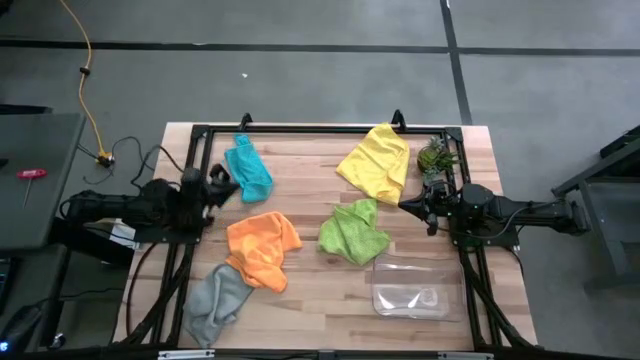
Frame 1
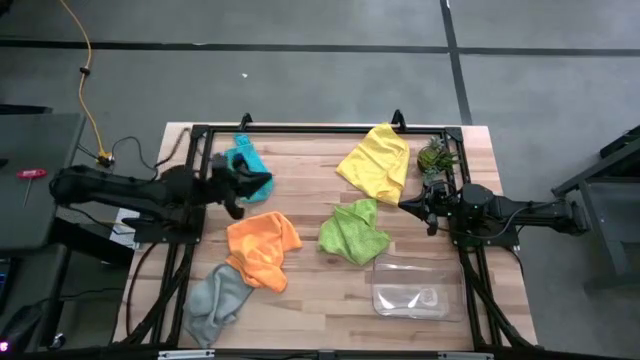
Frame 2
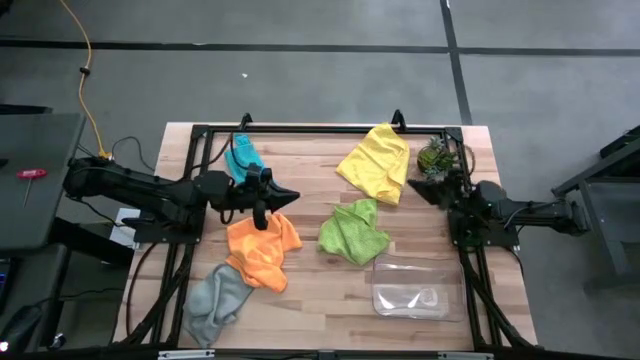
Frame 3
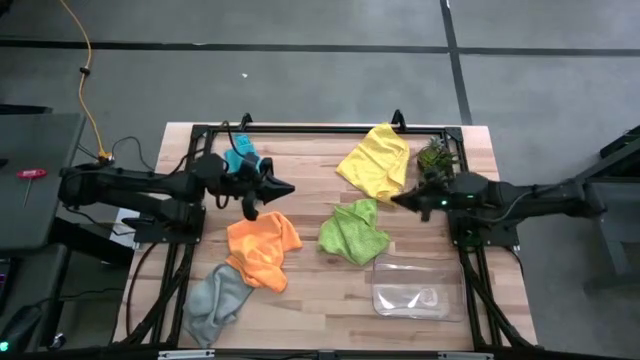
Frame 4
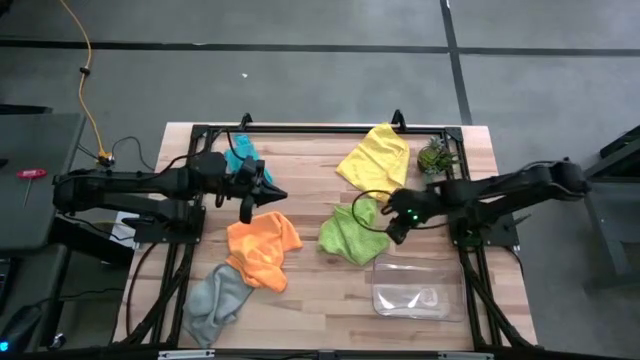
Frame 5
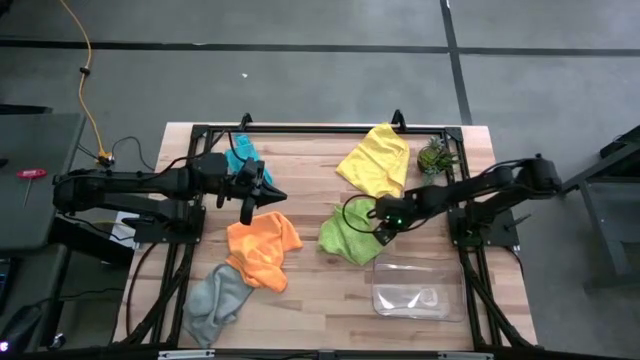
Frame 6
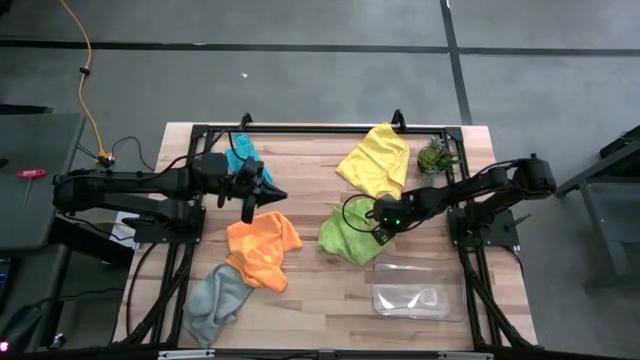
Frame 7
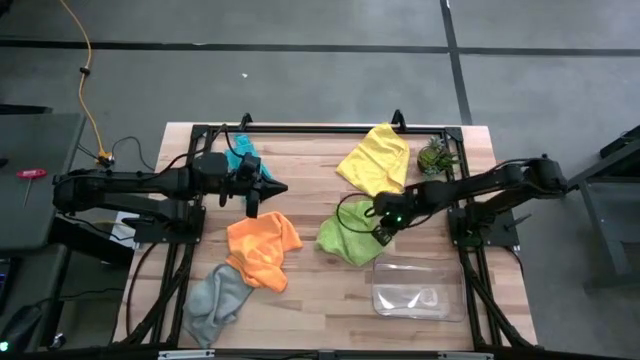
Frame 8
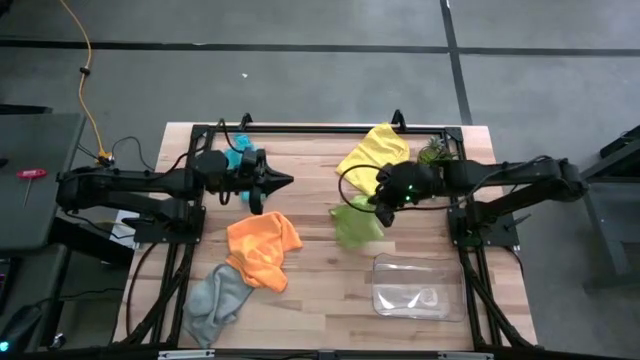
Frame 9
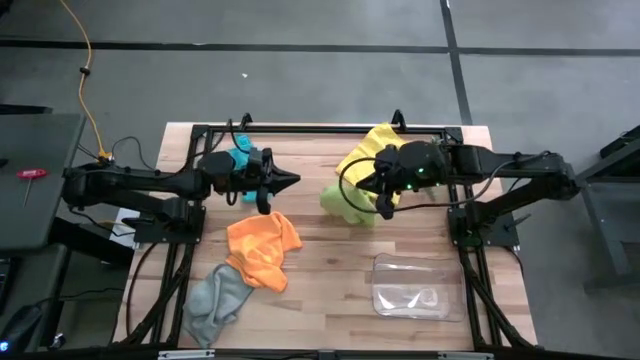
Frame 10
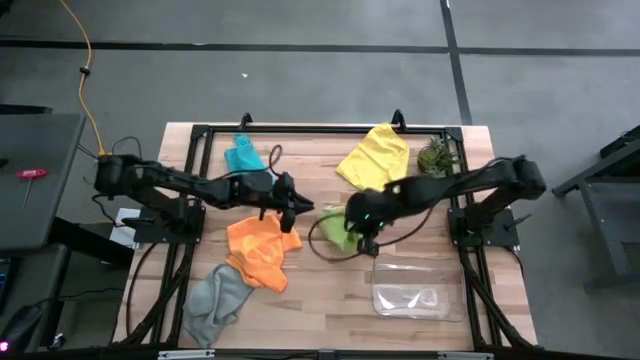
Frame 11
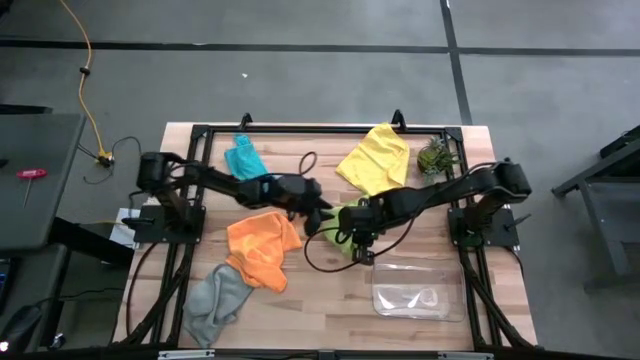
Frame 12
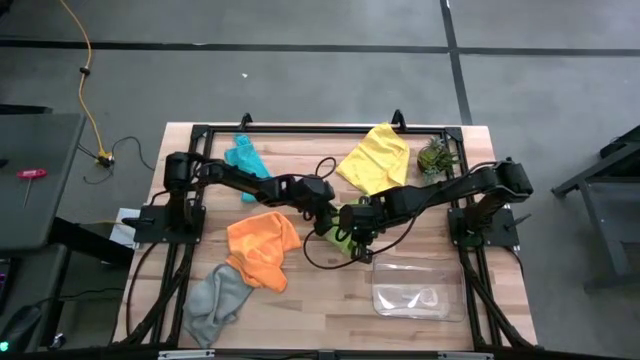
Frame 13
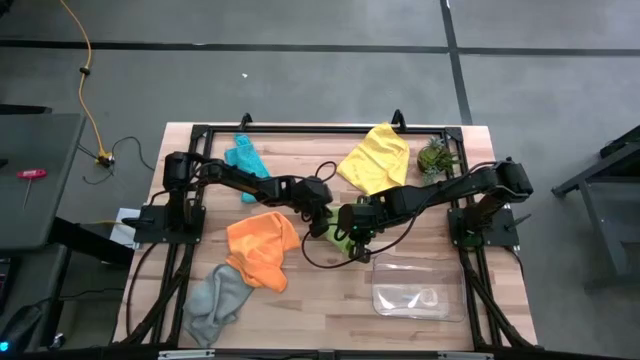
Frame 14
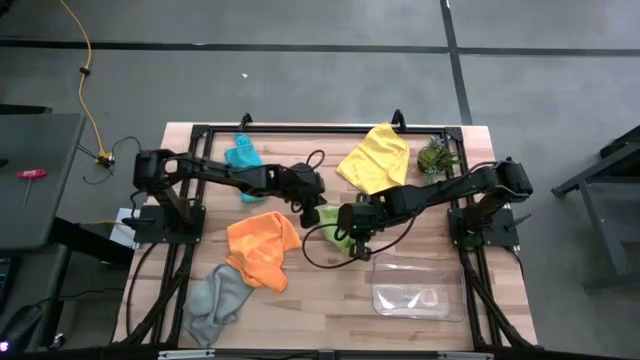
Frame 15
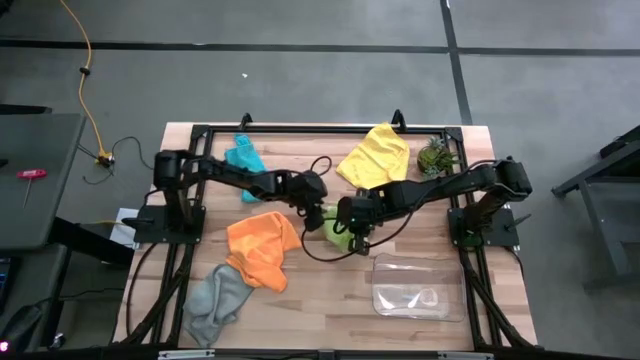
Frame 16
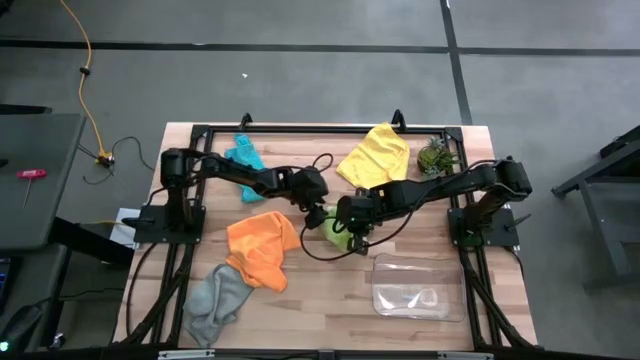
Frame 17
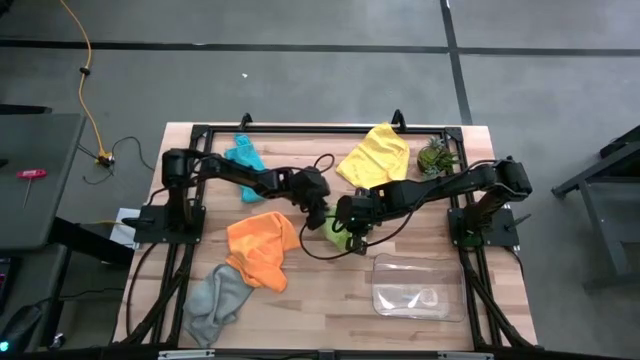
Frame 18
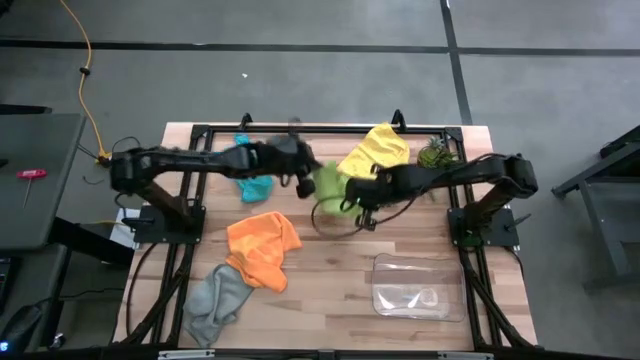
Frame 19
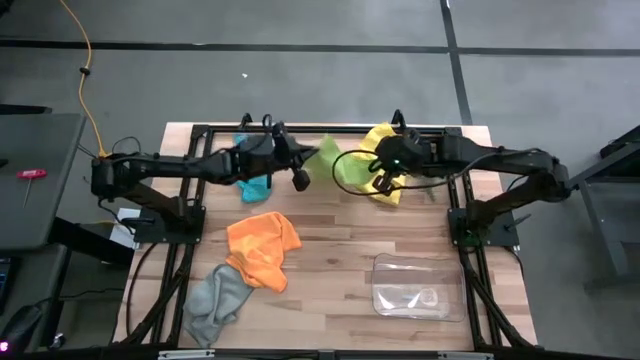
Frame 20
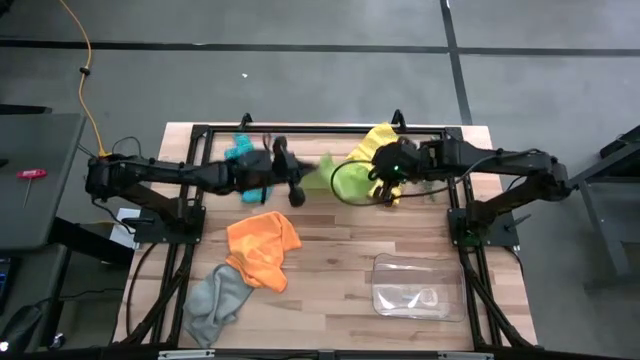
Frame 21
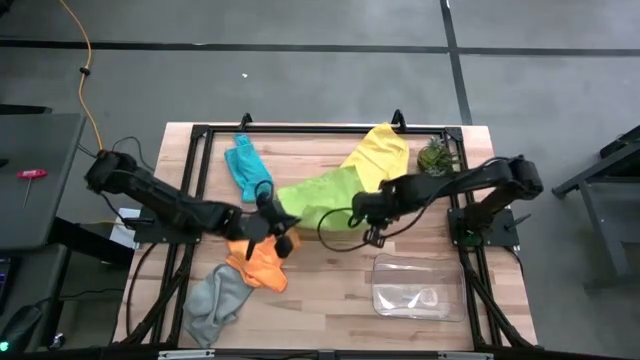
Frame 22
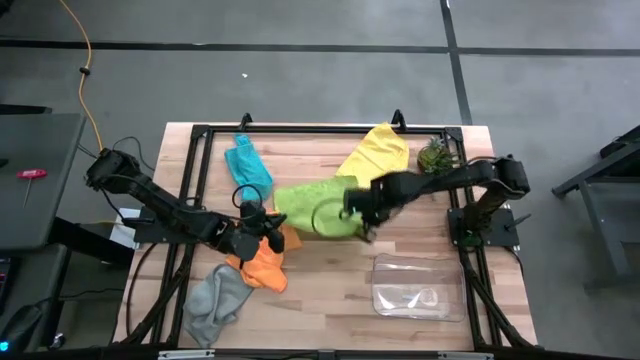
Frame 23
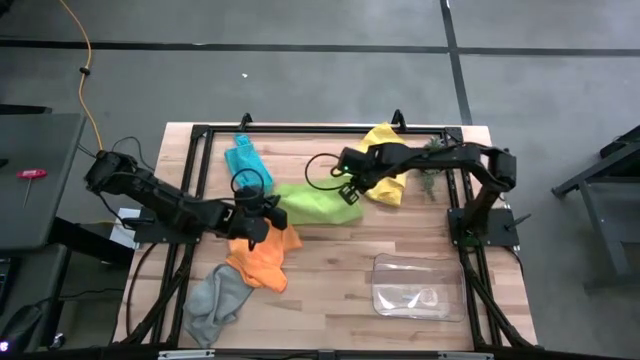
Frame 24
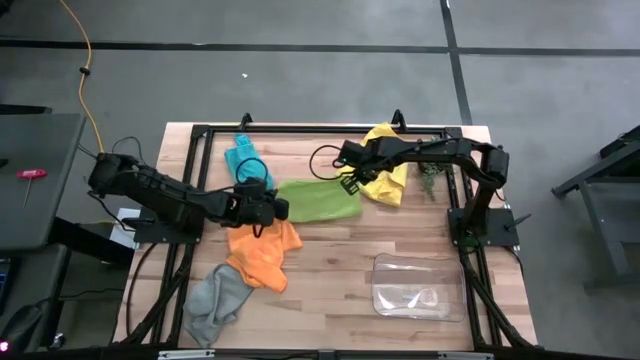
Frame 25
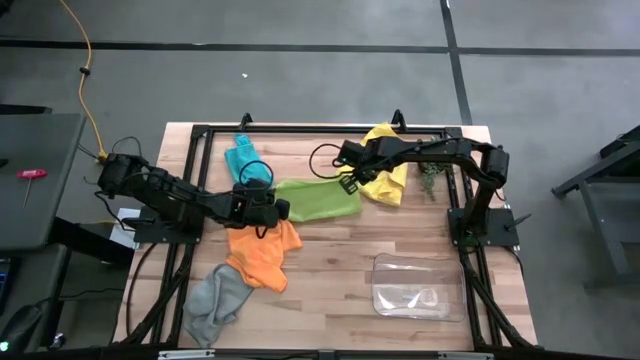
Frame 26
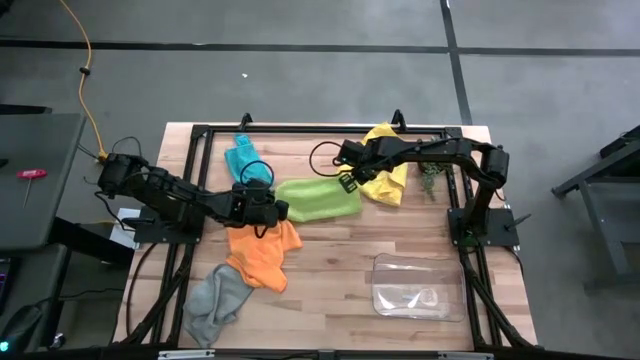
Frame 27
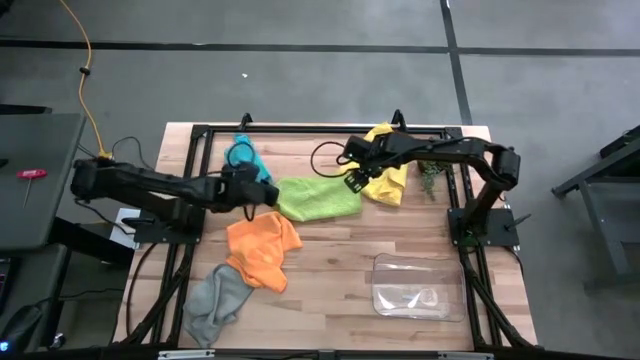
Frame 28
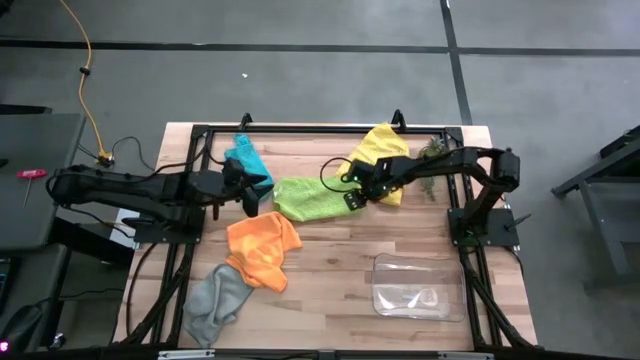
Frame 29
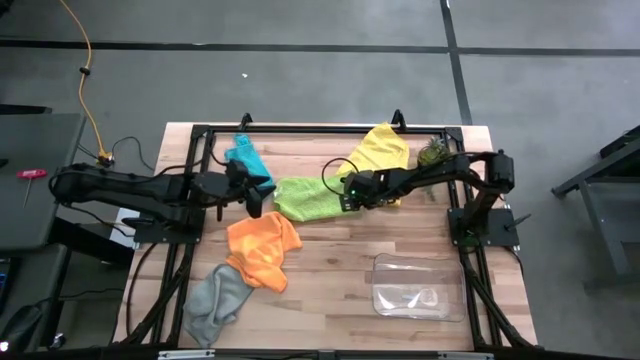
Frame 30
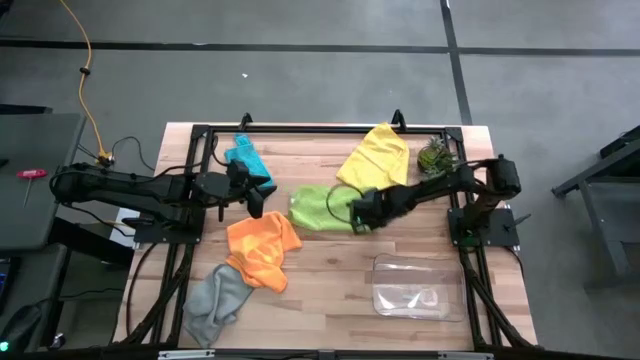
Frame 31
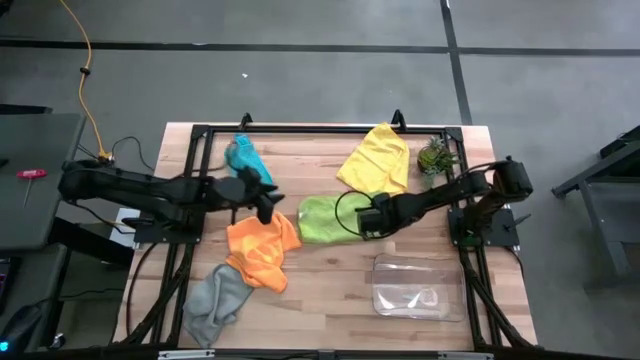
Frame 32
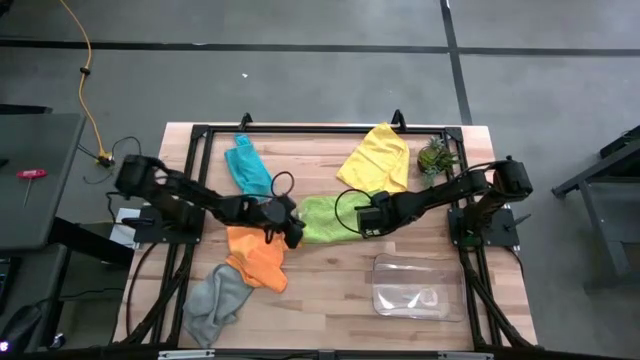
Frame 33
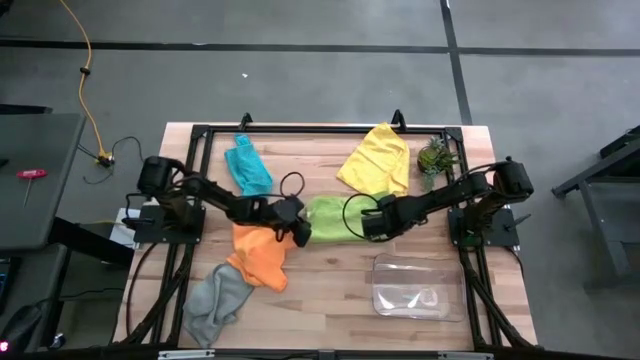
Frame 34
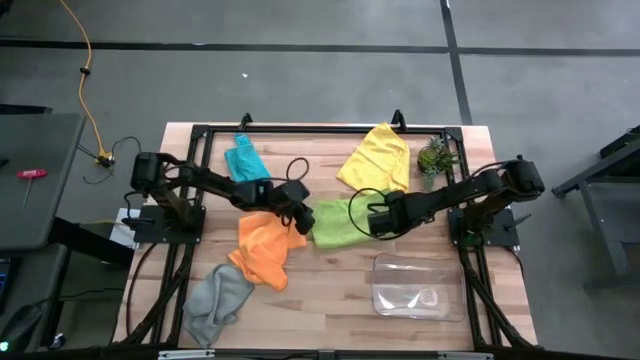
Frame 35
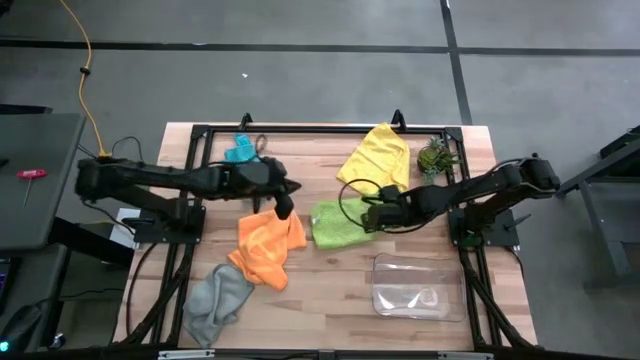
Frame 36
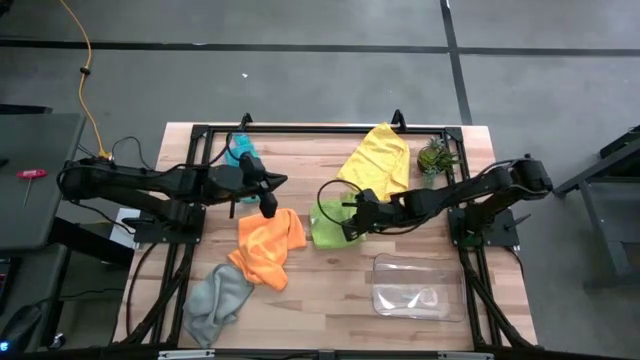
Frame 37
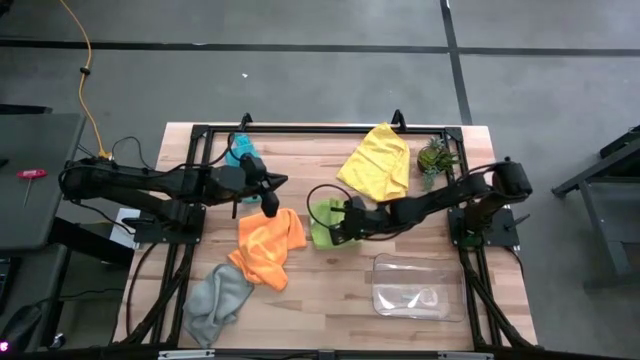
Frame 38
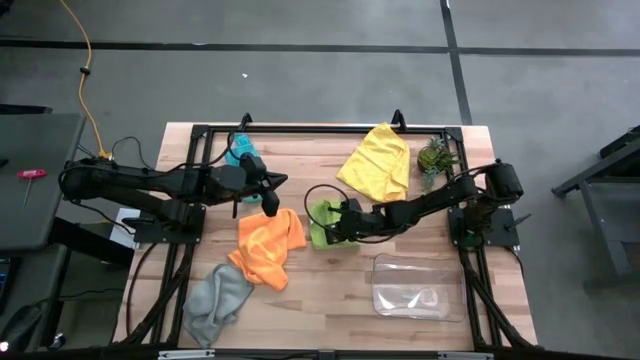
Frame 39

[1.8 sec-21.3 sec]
Task: Fold microfiber towels
Fold the green microfiber cloth
